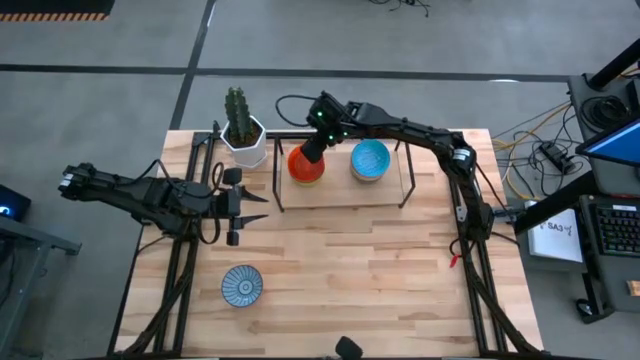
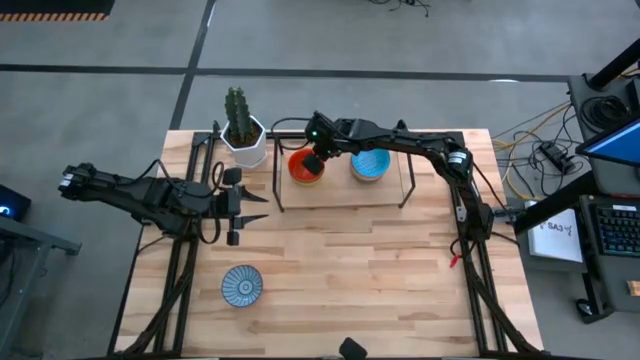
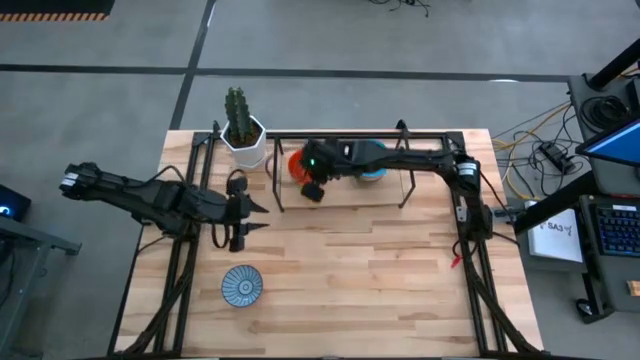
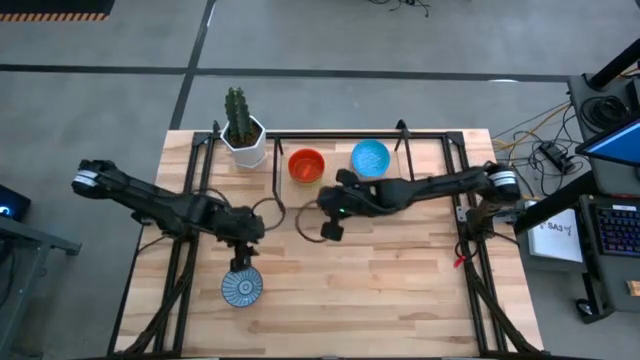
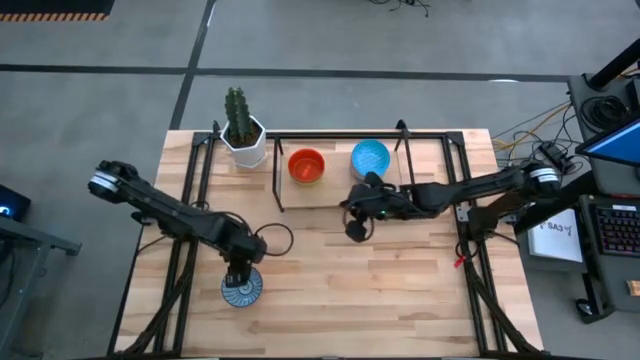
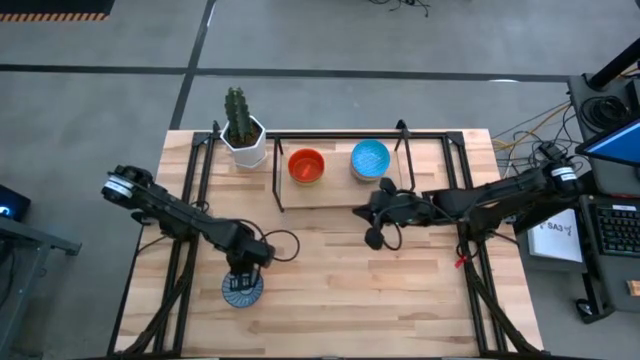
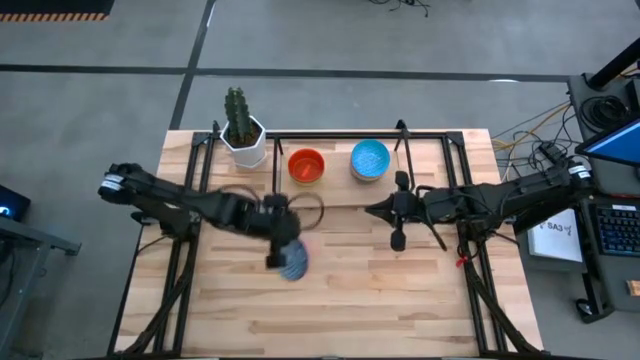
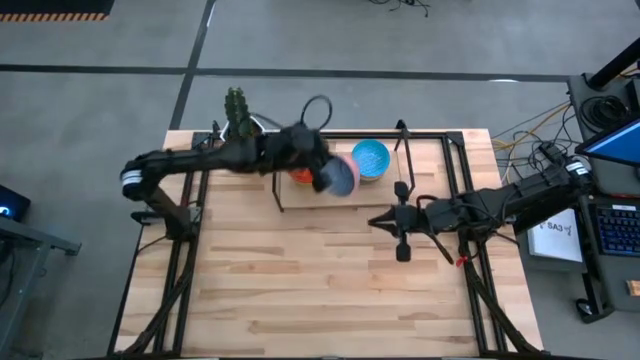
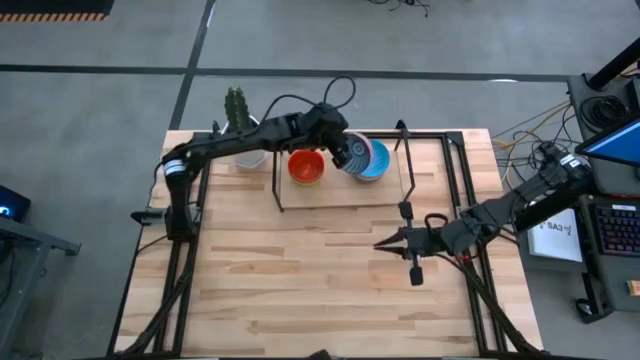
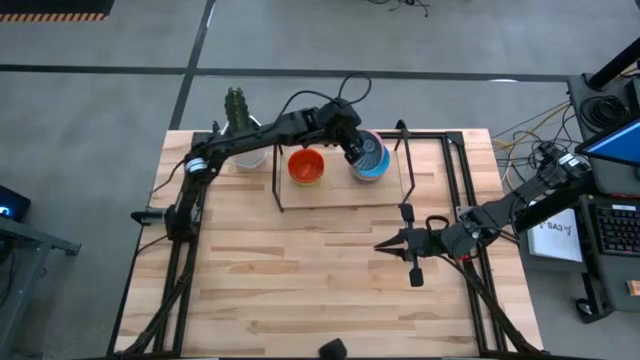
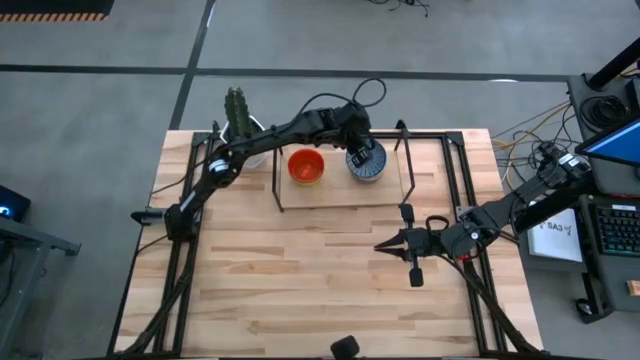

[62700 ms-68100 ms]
Task: Place and stack bowls onto a shelf
Stack the dark blue patterned bowl on the blue patterned bowl

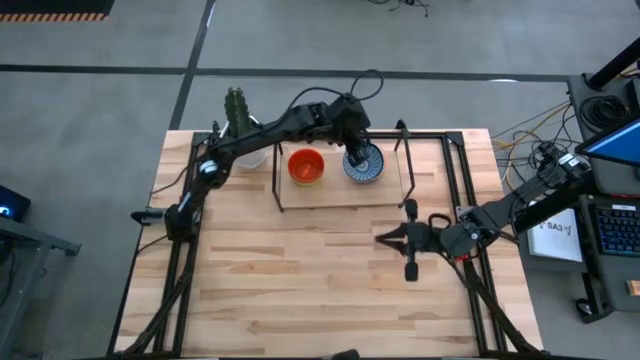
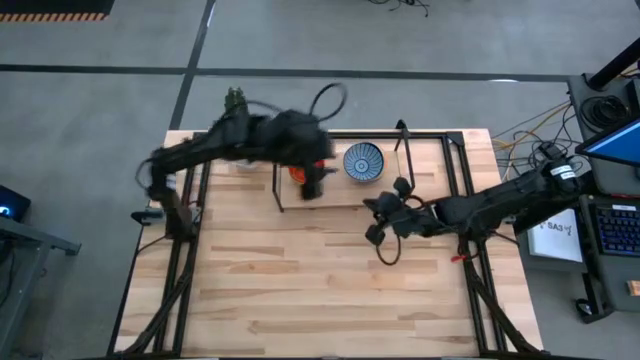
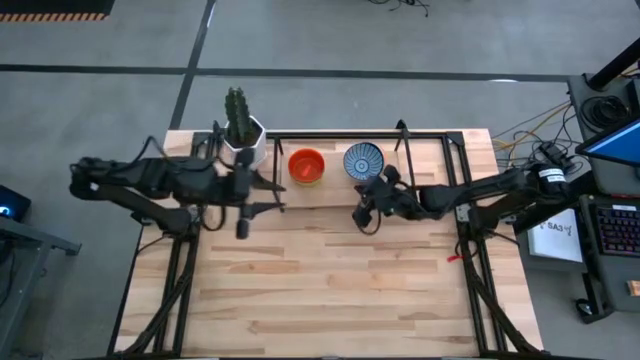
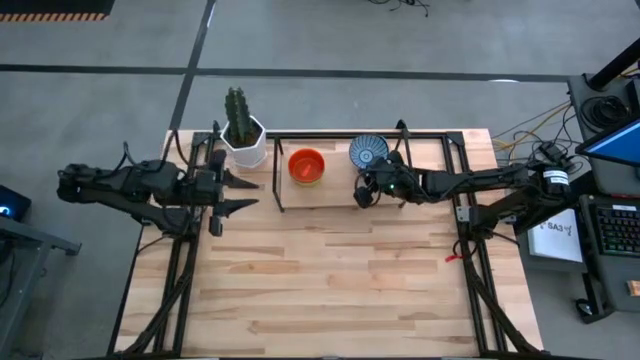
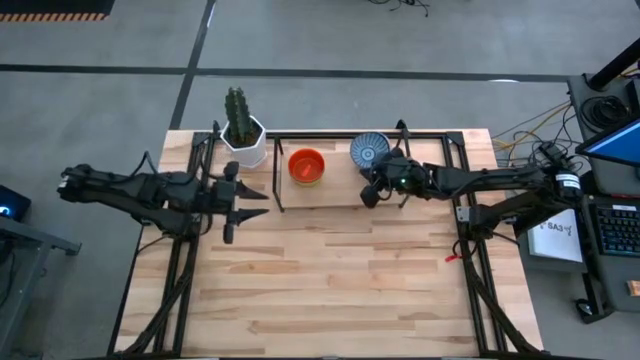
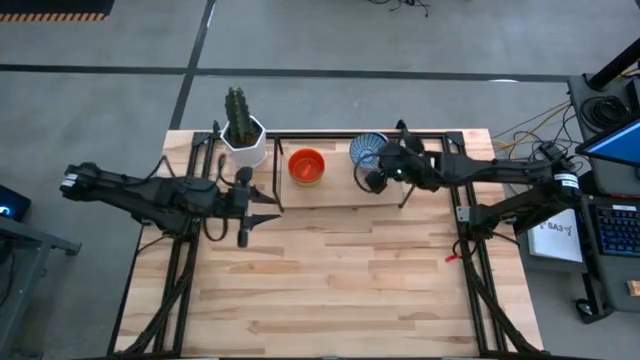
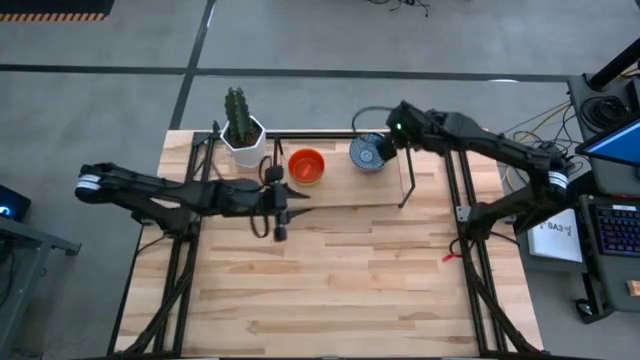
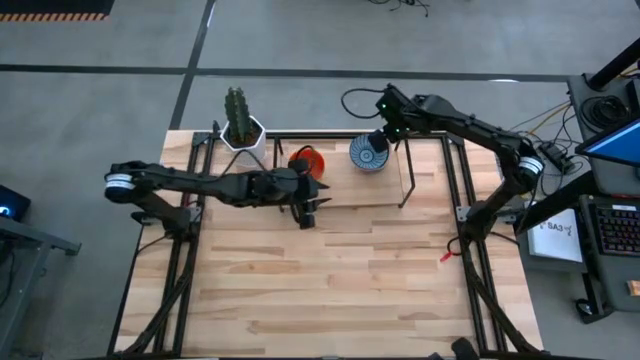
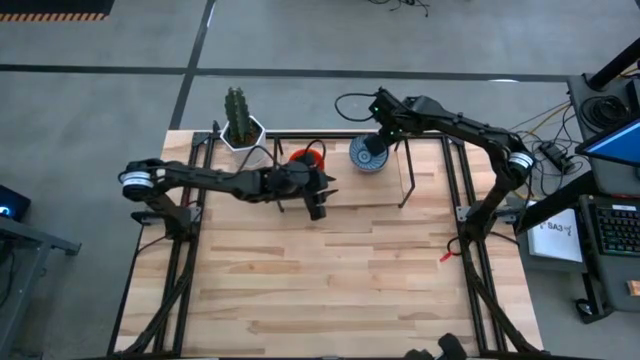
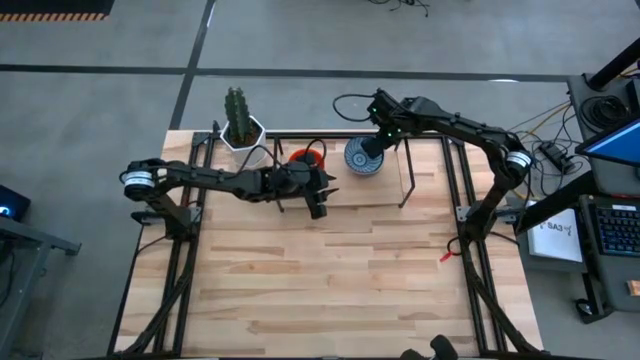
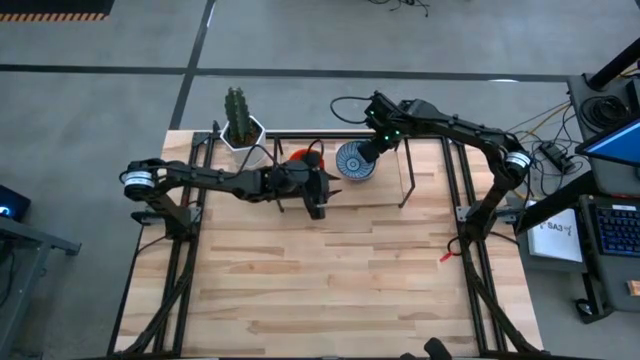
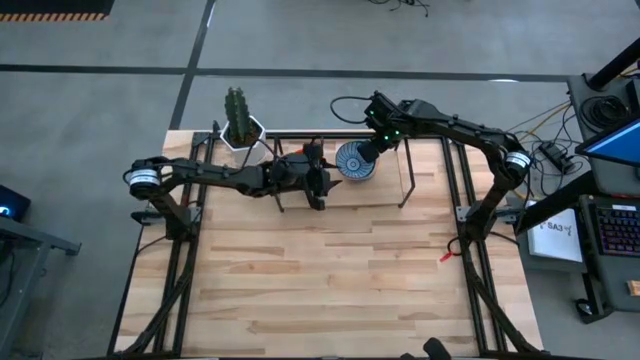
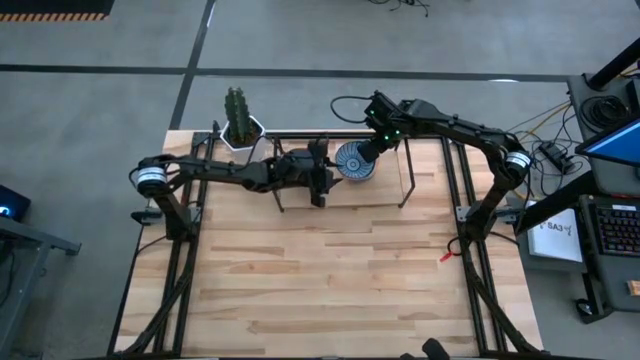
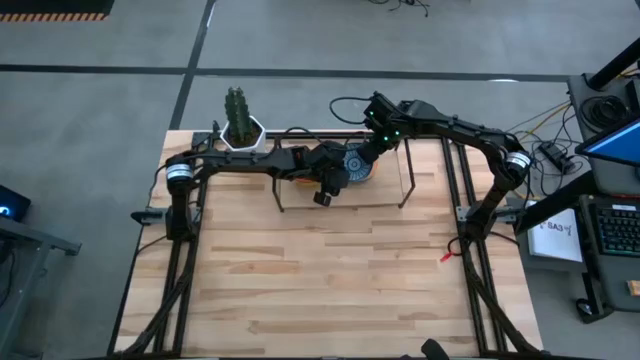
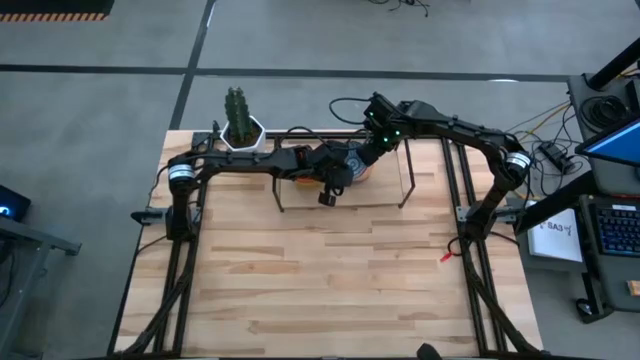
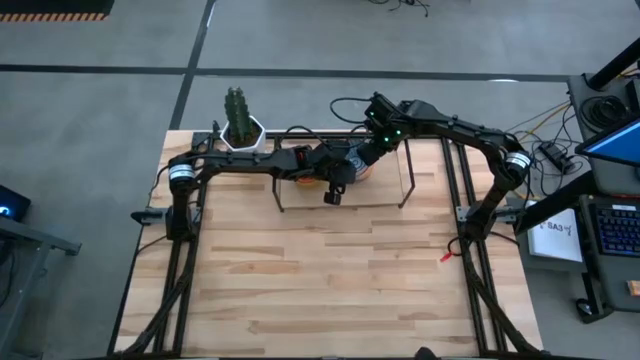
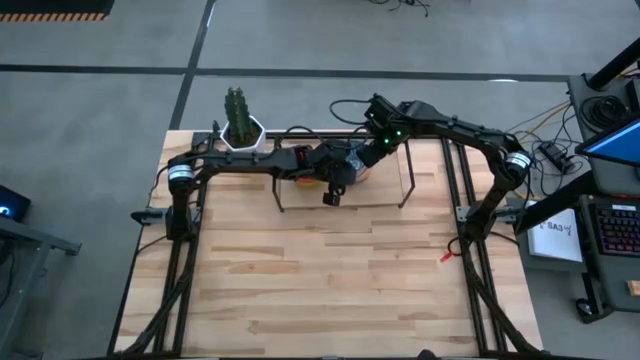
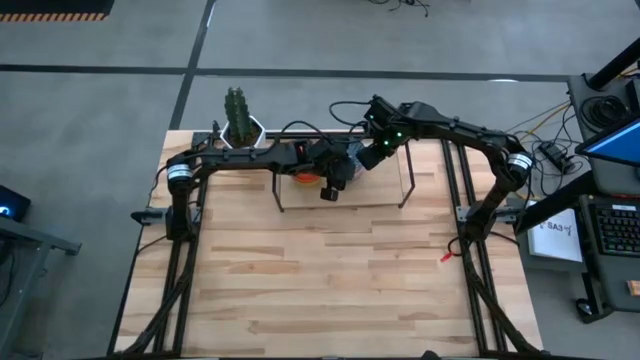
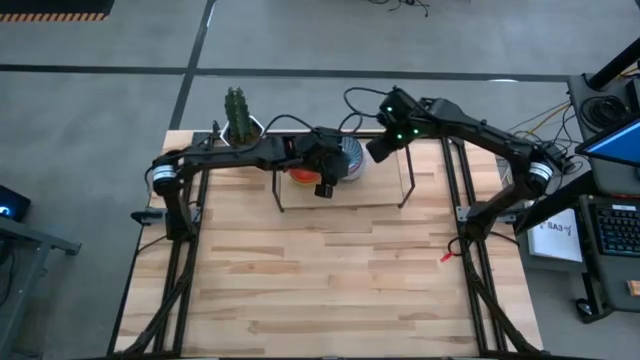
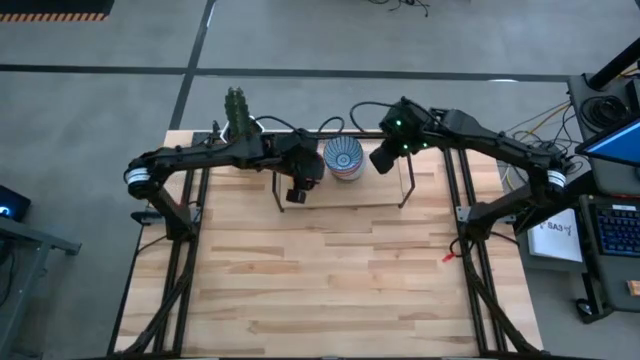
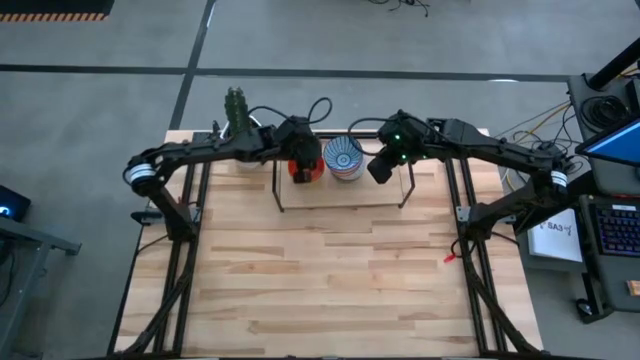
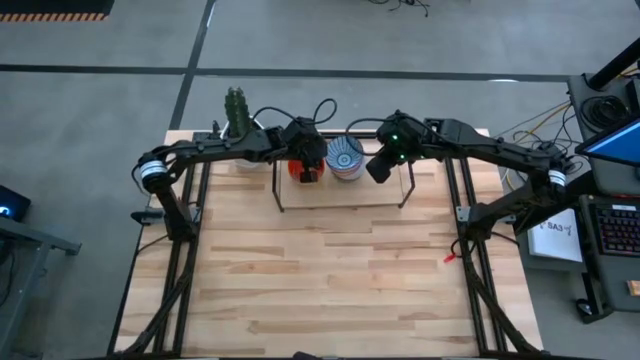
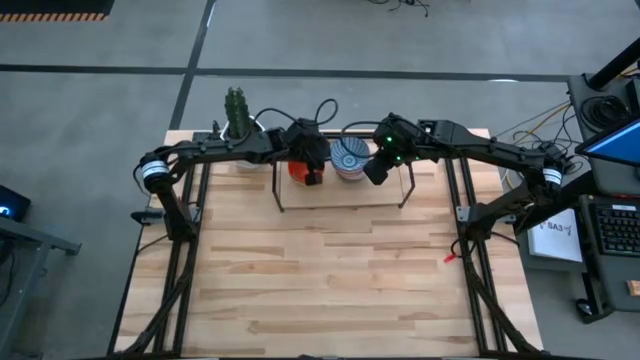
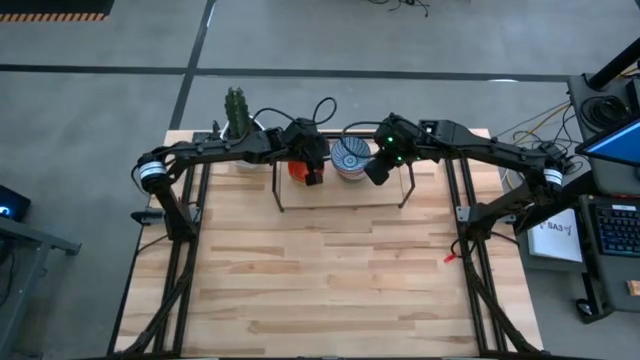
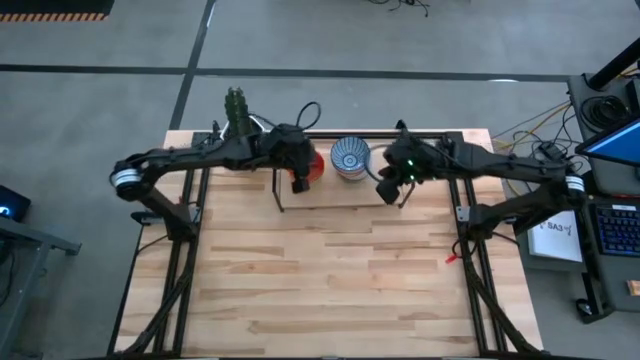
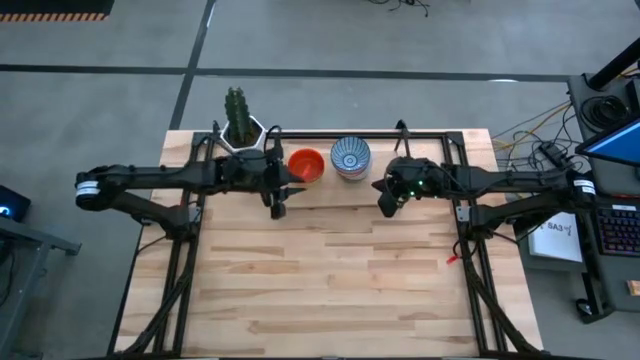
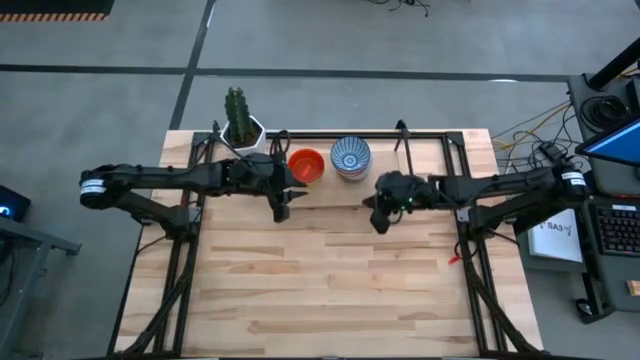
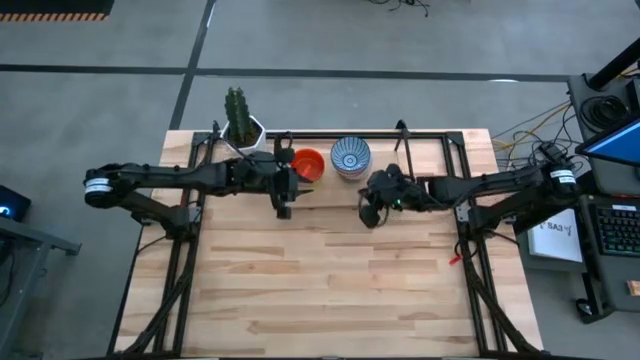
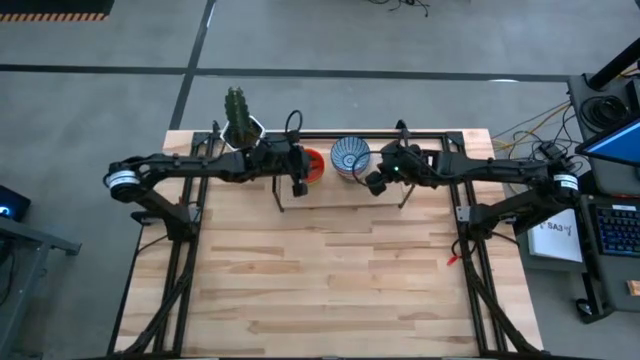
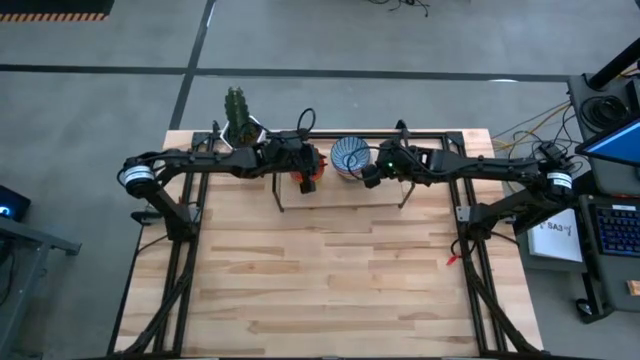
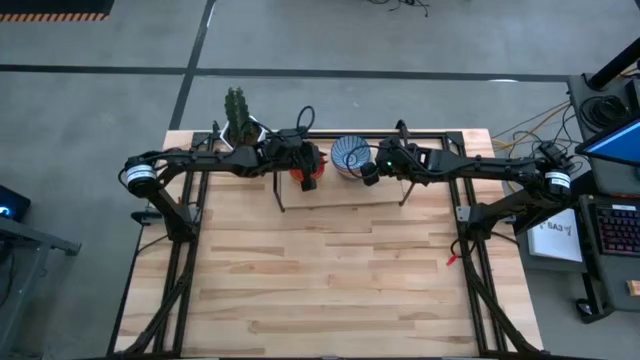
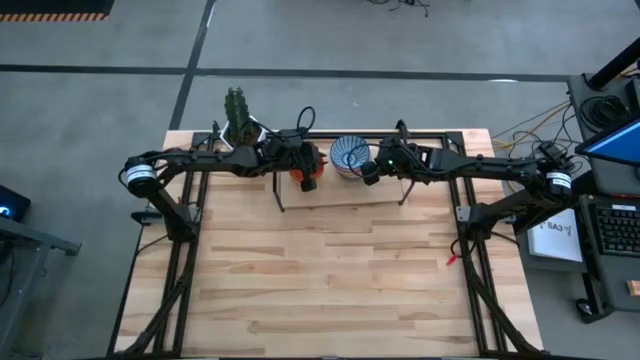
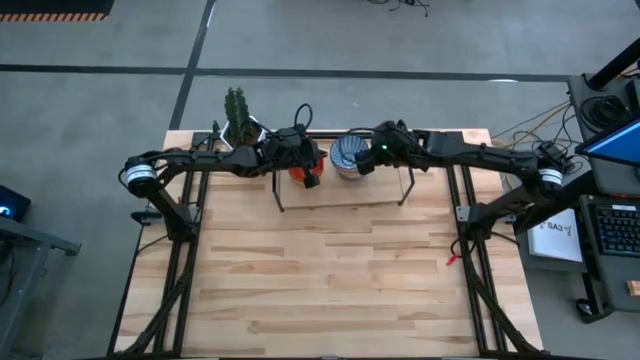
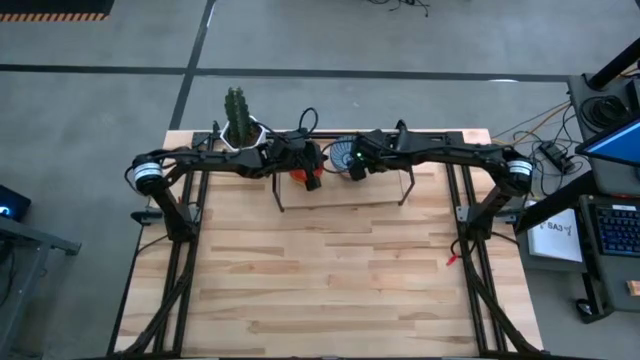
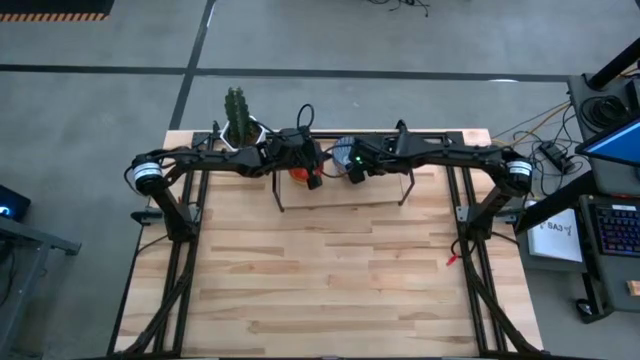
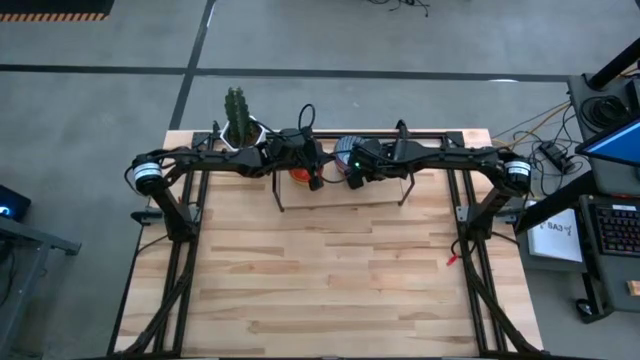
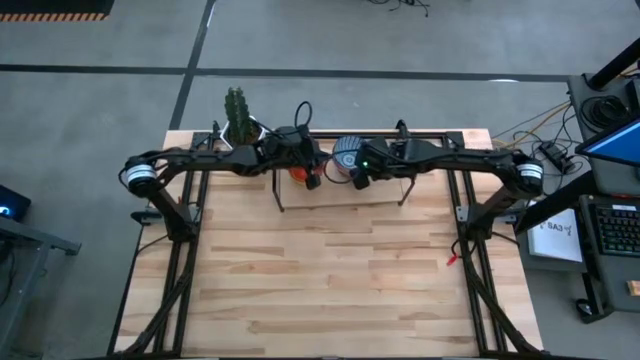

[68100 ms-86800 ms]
Adjust the right pattern bowls
